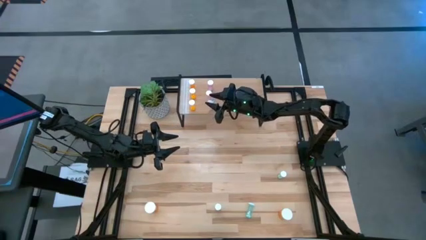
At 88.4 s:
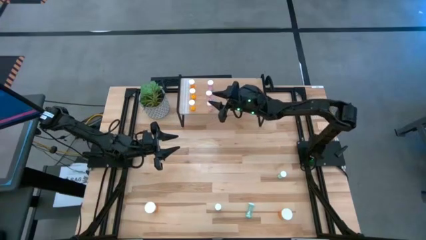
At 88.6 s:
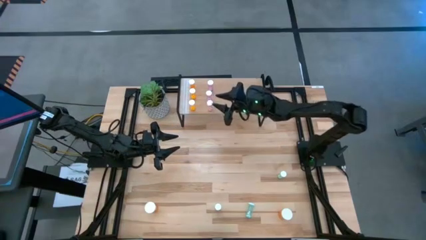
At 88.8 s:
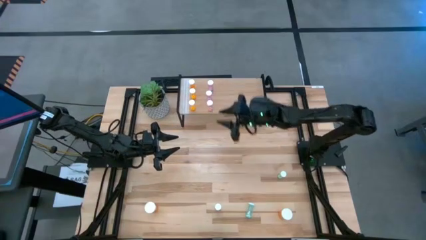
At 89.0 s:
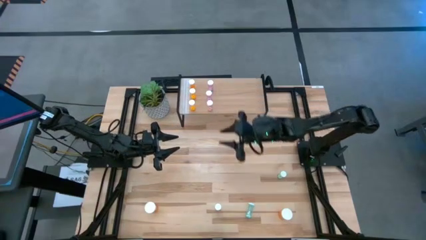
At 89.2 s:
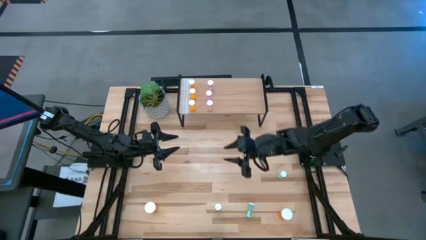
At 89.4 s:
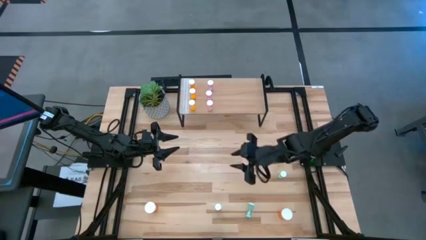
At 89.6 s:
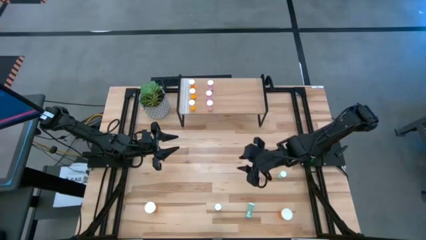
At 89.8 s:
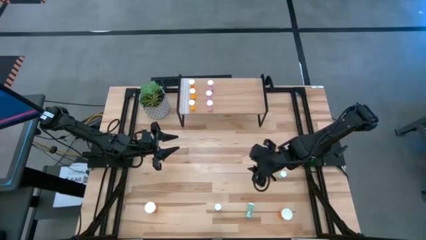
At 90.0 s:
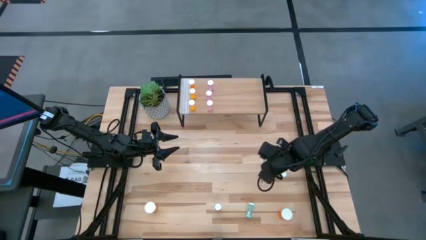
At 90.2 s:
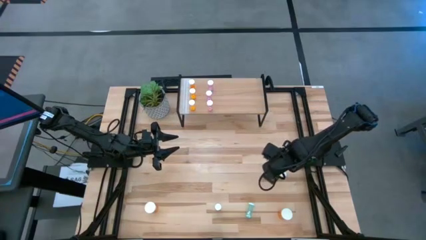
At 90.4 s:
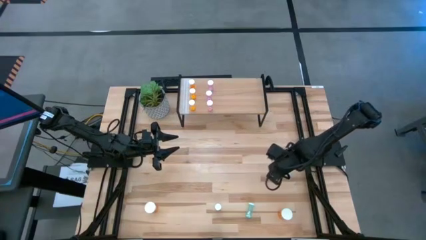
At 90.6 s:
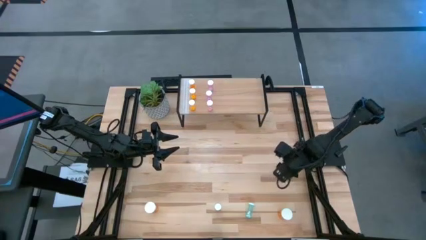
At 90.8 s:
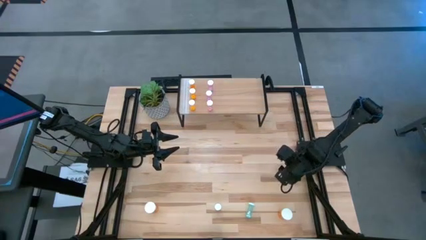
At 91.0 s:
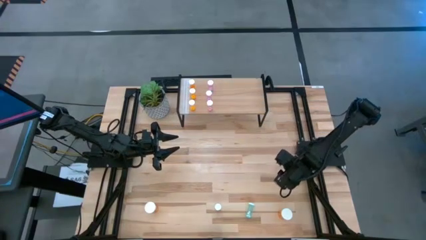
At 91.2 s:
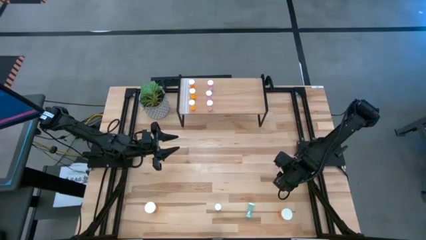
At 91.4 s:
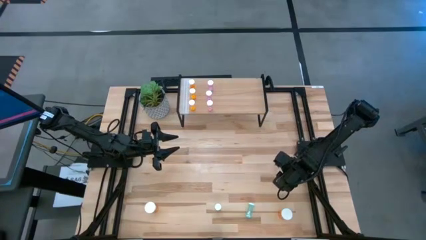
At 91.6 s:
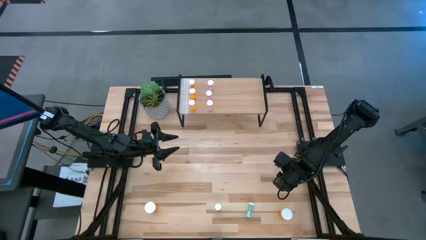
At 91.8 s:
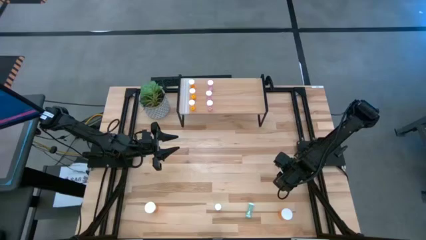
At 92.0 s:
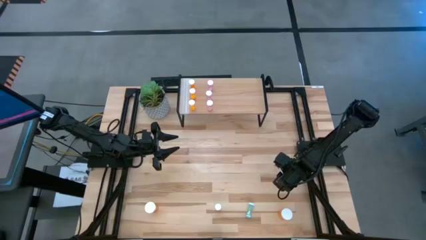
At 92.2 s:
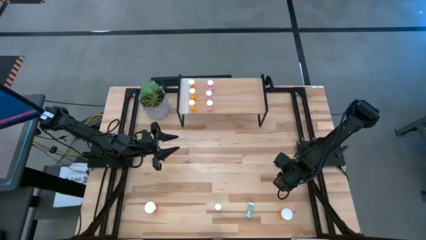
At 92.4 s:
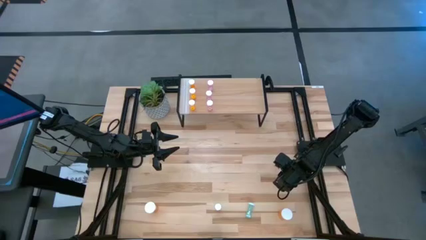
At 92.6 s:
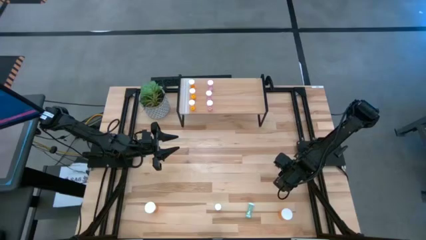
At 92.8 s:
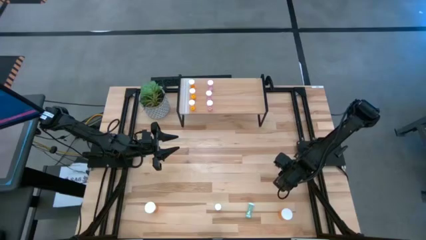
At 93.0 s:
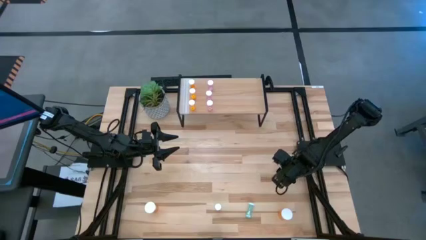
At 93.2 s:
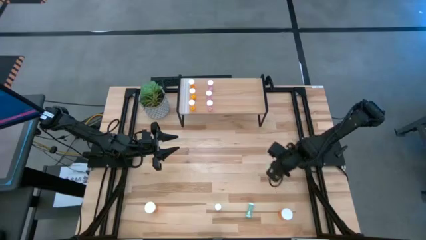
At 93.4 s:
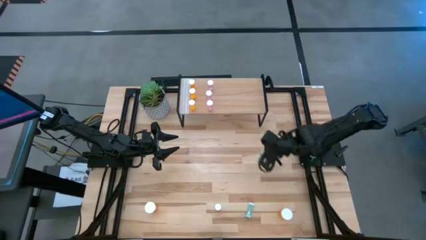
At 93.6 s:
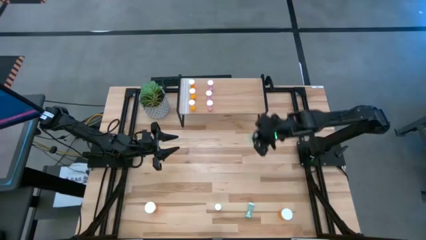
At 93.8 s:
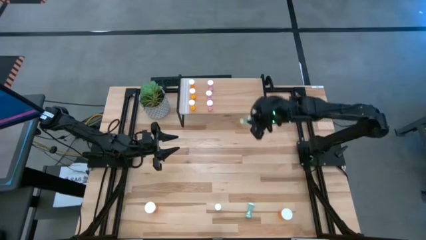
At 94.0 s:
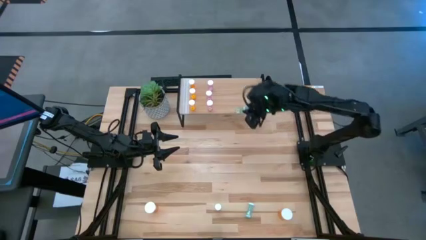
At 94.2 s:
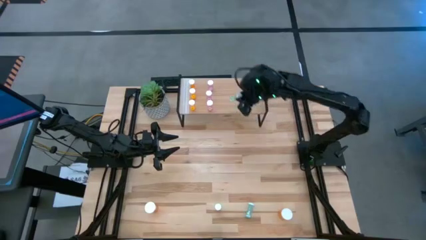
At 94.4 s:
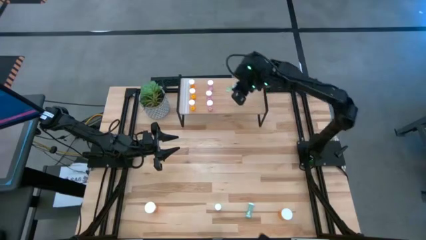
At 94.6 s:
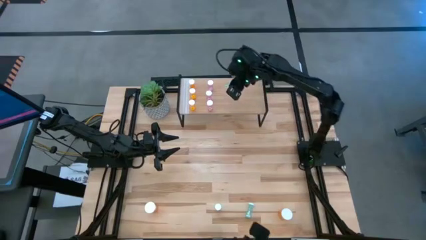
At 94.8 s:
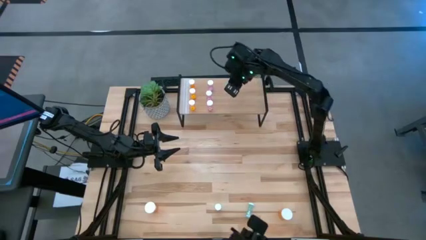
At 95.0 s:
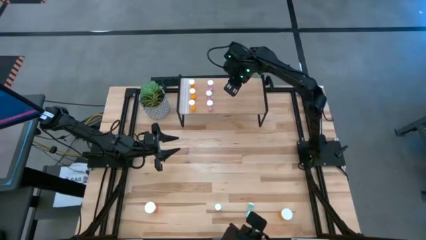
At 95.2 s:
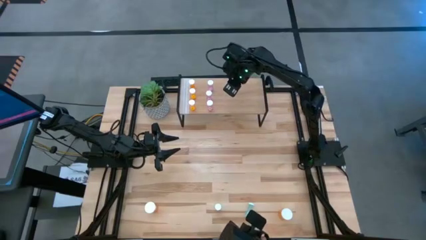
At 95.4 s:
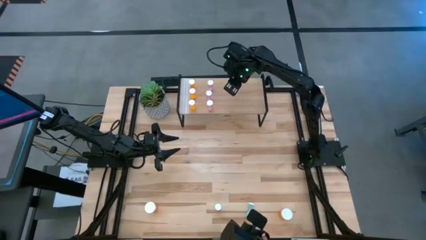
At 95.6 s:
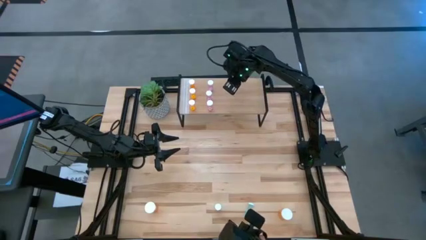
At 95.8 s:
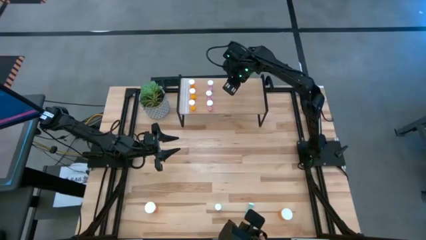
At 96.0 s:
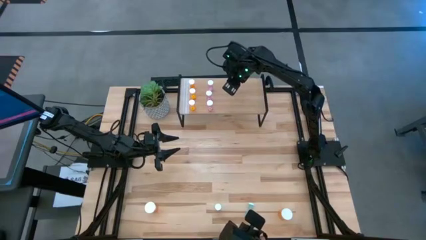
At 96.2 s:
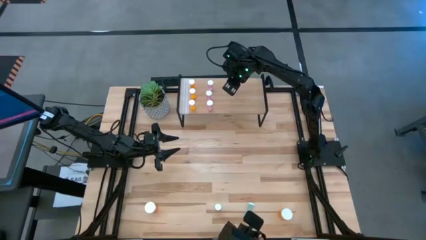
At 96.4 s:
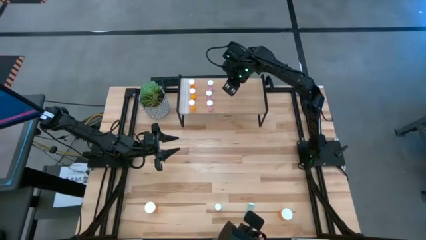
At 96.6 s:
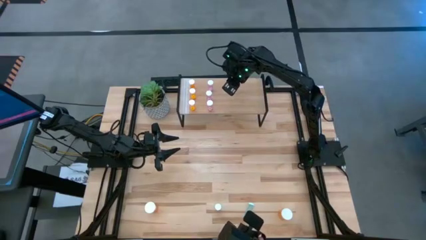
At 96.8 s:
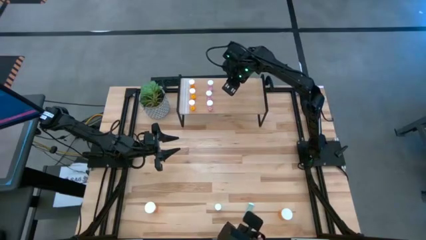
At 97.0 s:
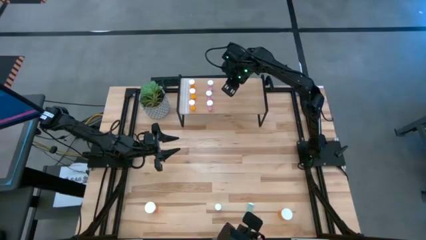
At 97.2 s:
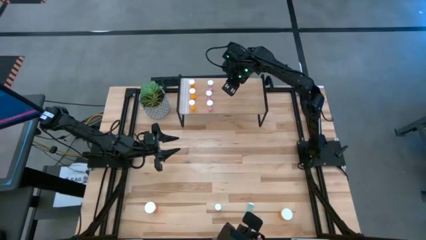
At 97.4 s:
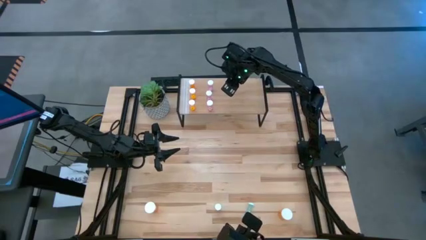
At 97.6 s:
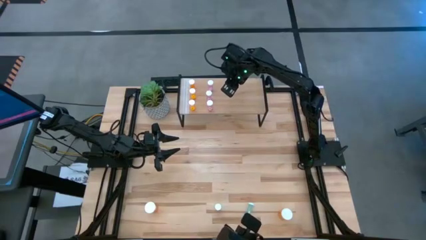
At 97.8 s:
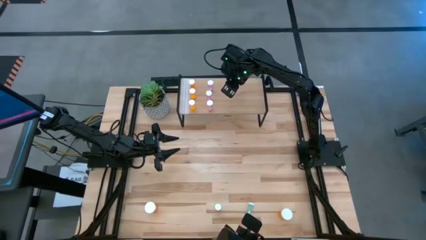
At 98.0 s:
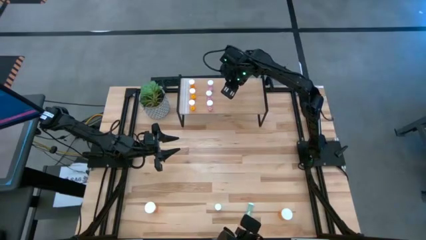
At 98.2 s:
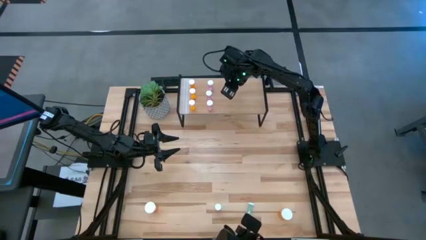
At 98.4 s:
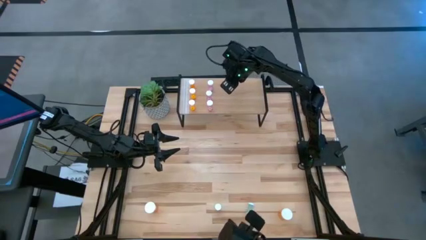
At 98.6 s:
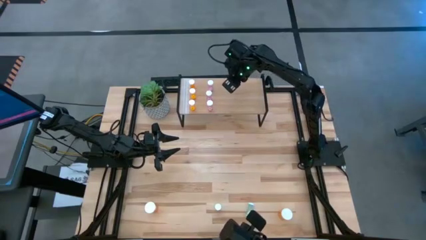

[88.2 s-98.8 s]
Task: Pick and place medicine bottles onto shelf by color
Put the top green pill bottle on the shelf
